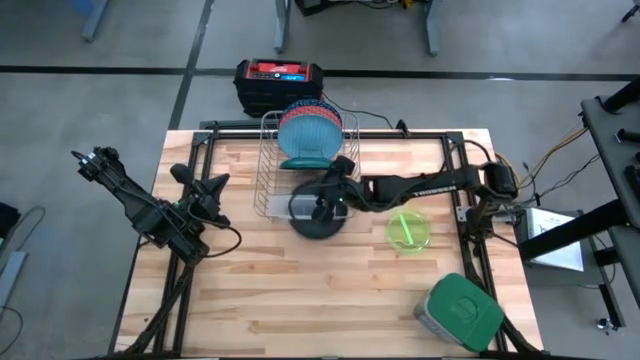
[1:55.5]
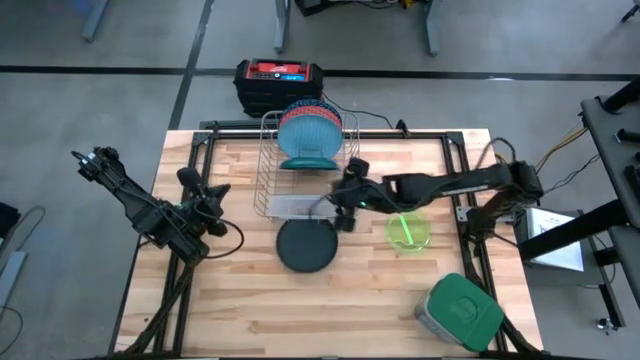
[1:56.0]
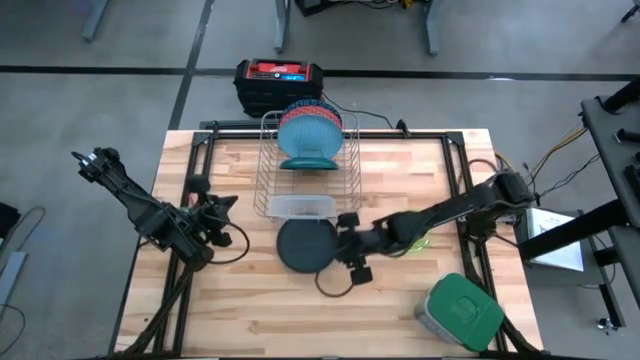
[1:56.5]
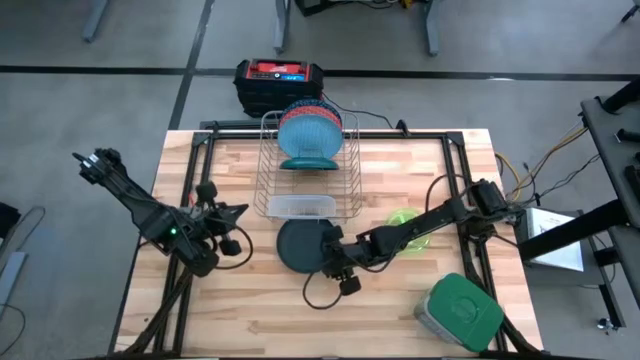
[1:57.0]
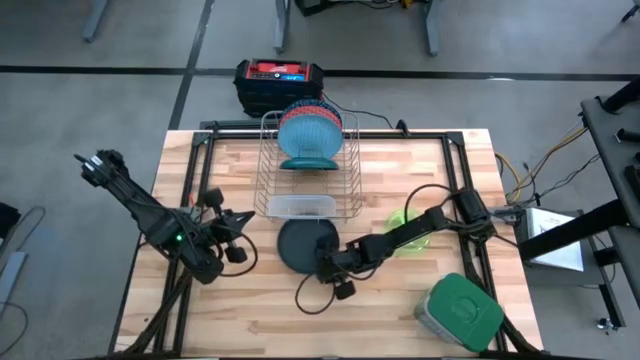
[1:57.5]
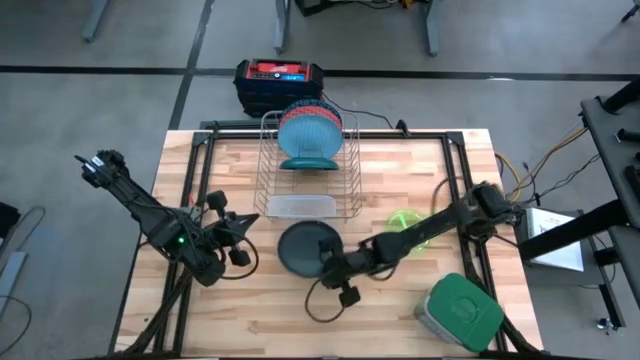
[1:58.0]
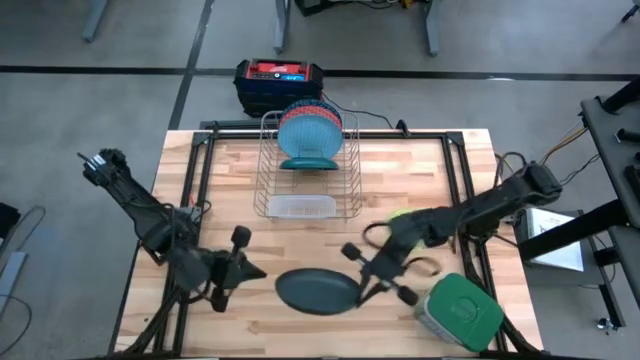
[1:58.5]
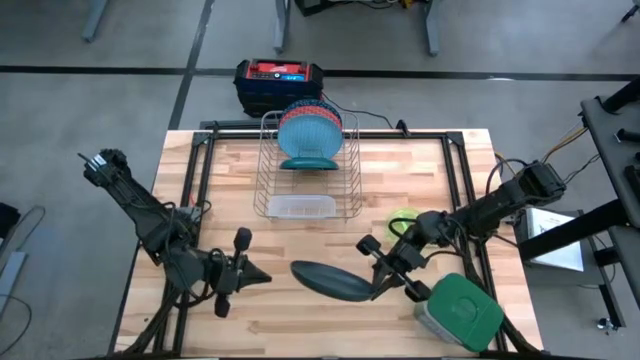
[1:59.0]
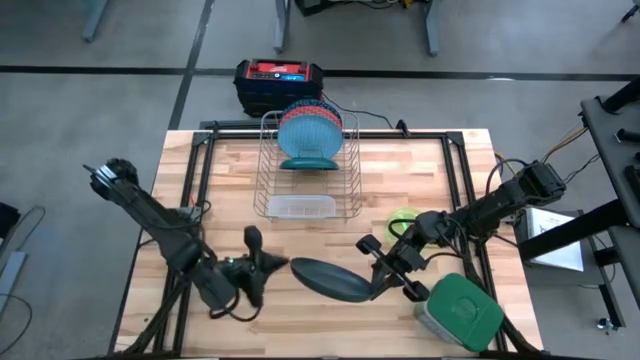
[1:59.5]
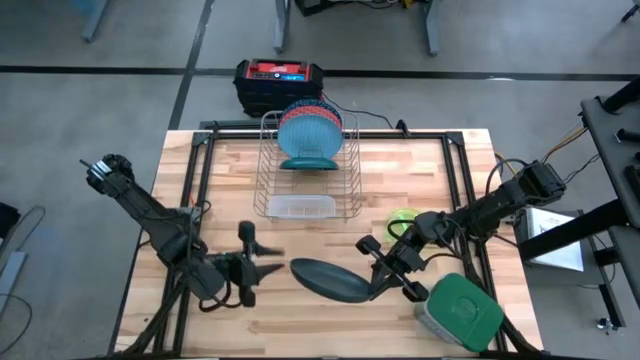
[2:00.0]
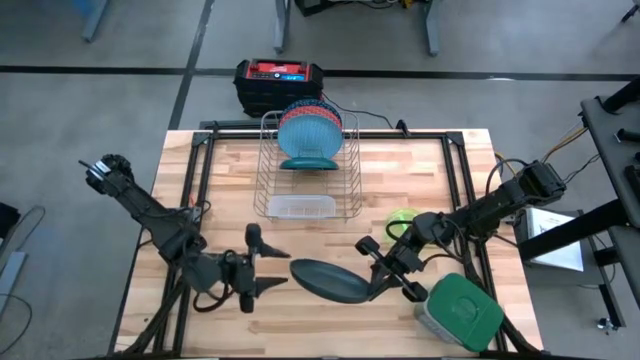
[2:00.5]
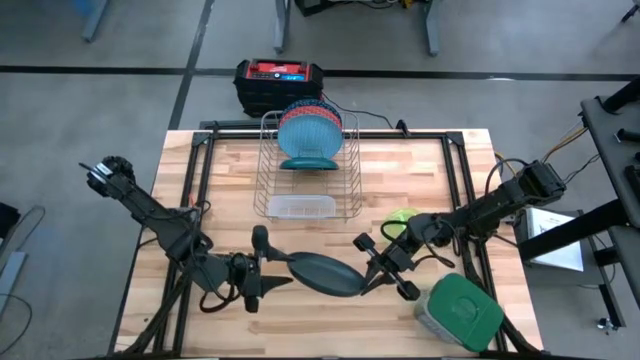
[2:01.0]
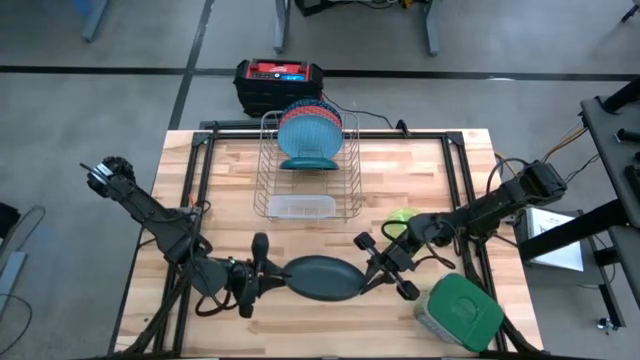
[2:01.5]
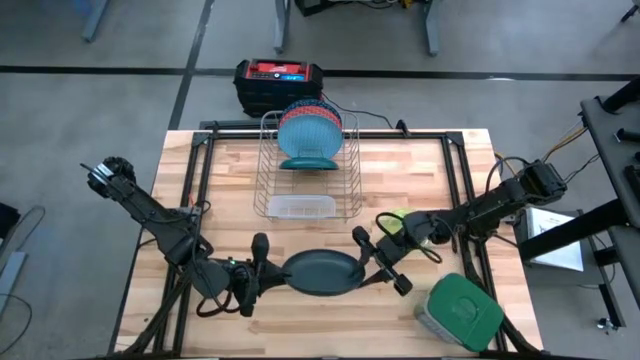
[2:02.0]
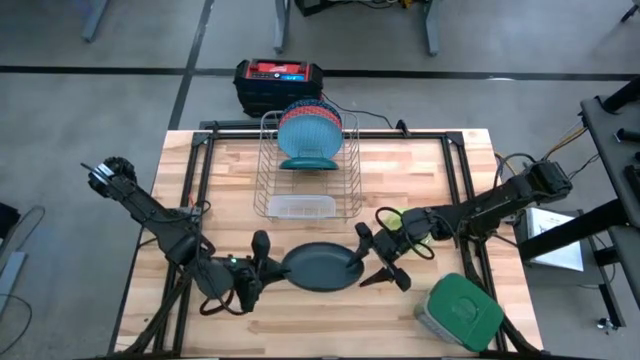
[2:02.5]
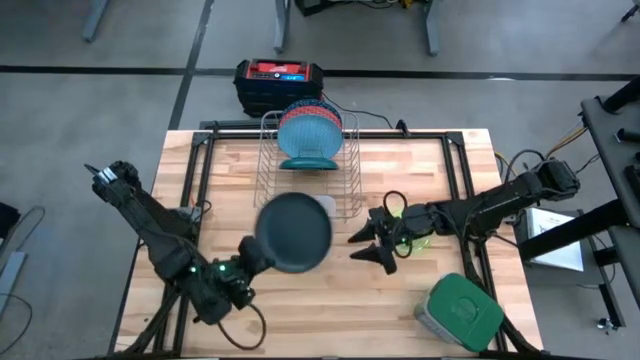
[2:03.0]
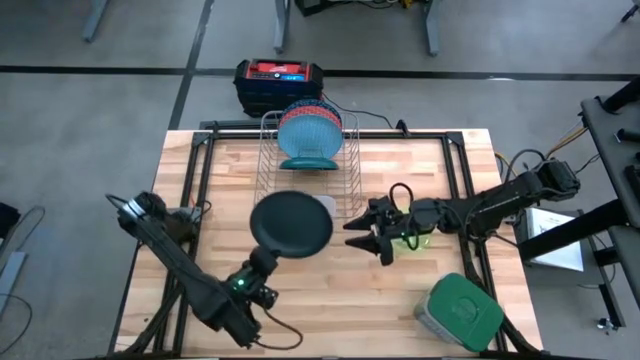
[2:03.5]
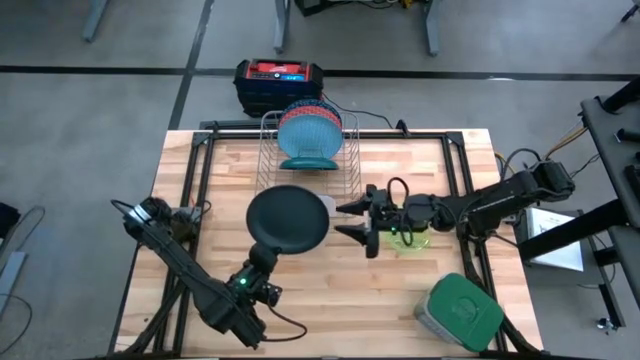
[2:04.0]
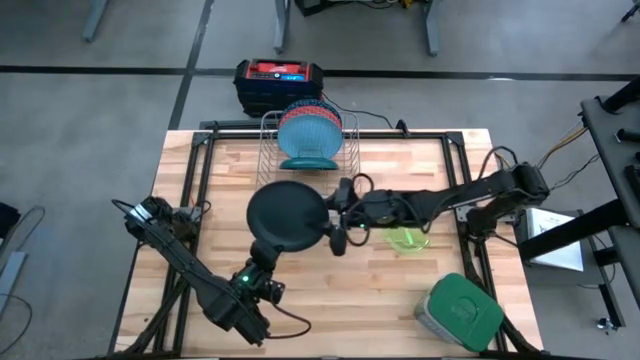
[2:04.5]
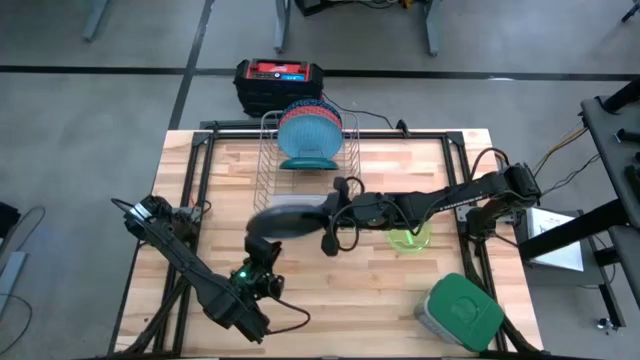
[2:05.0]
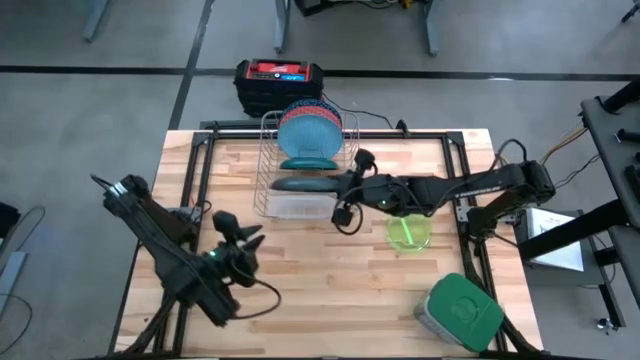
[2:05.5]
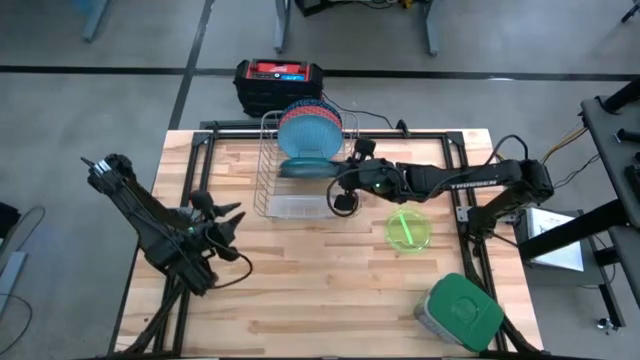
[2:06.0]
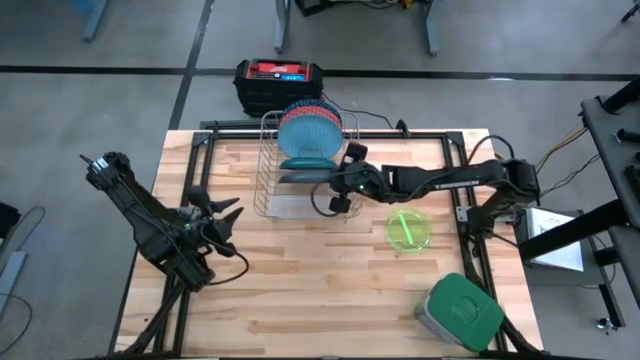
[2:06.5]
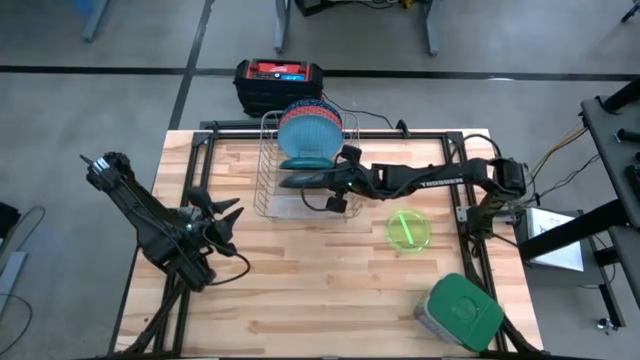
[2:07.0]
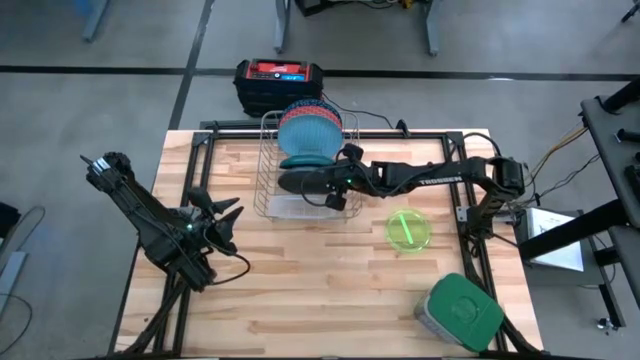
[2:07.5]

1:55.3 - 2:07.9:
Task: Sort dishes
Put the black plate into the dish rack

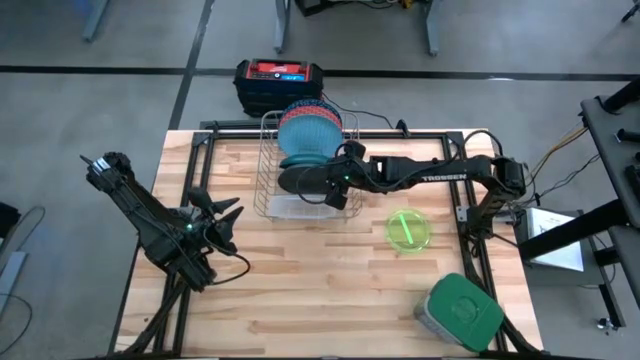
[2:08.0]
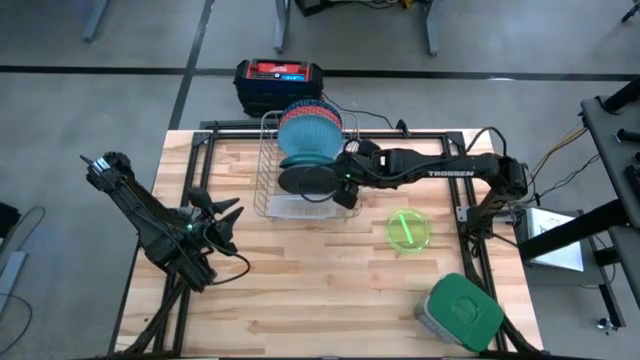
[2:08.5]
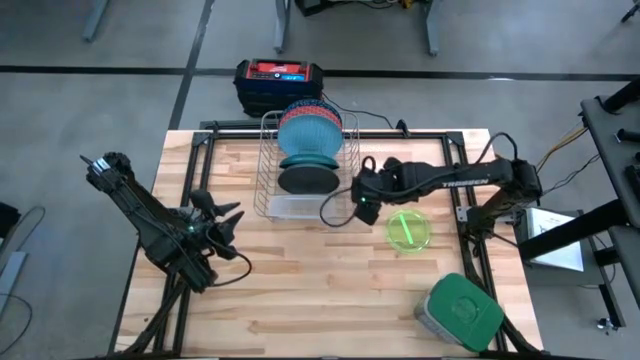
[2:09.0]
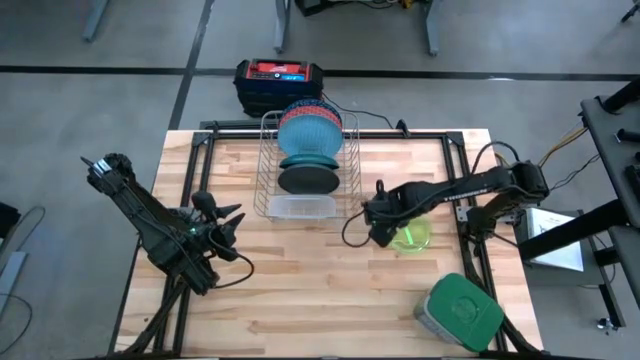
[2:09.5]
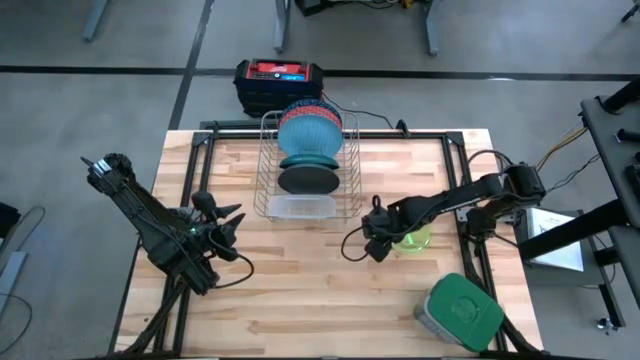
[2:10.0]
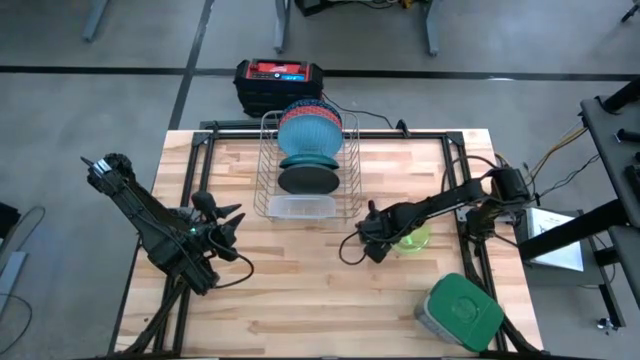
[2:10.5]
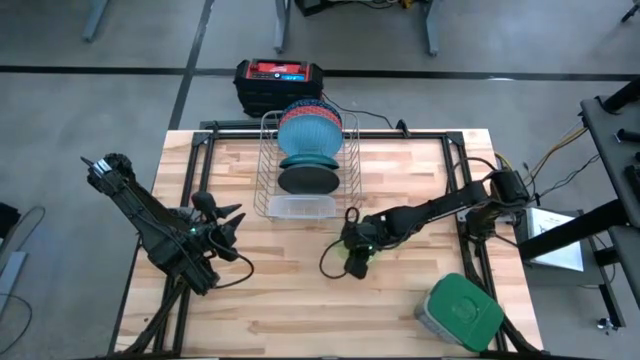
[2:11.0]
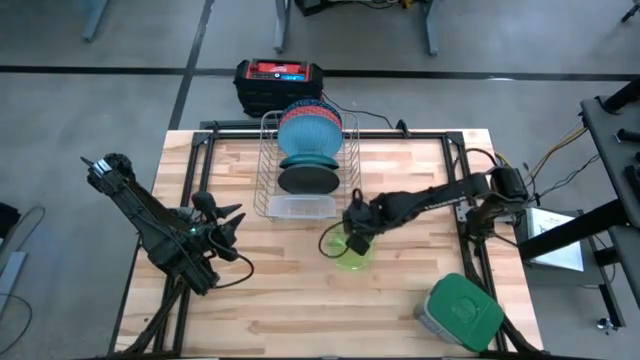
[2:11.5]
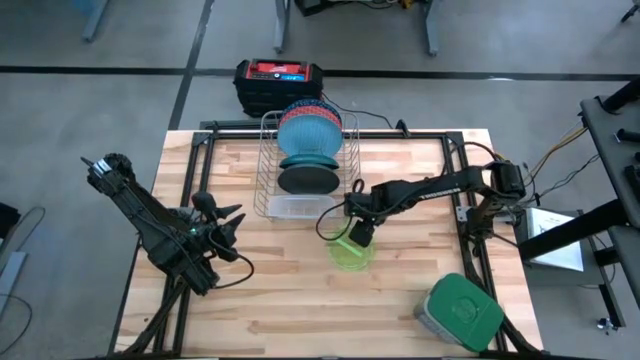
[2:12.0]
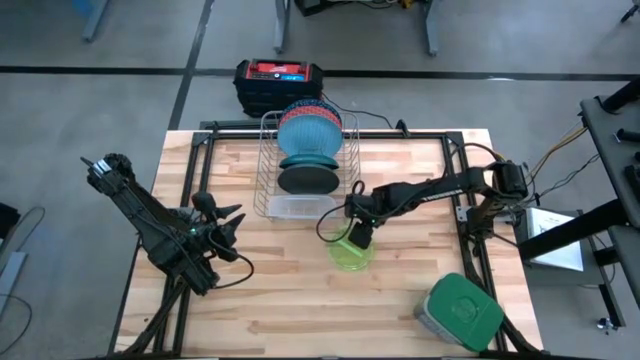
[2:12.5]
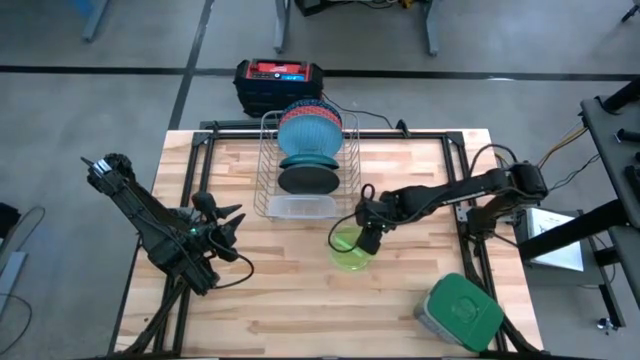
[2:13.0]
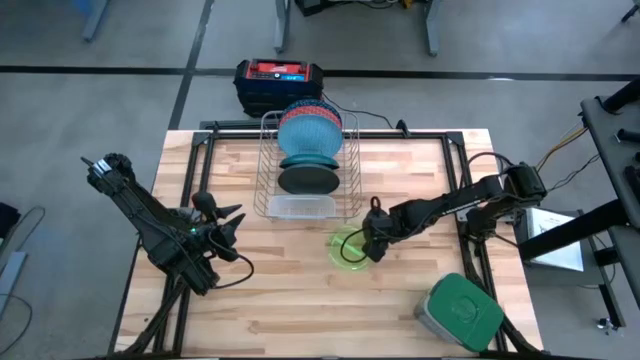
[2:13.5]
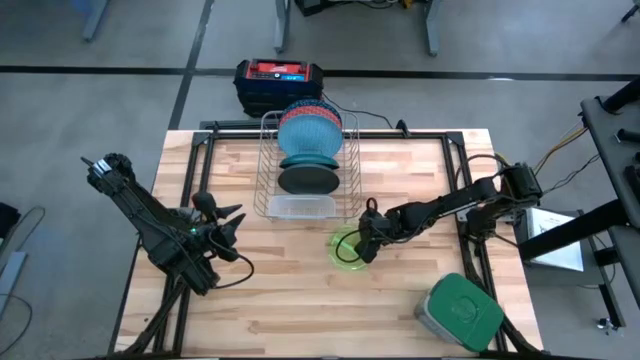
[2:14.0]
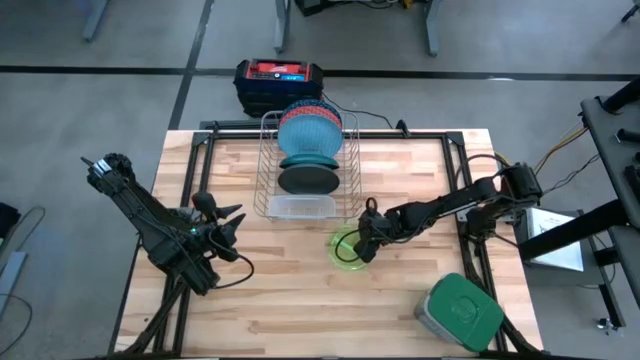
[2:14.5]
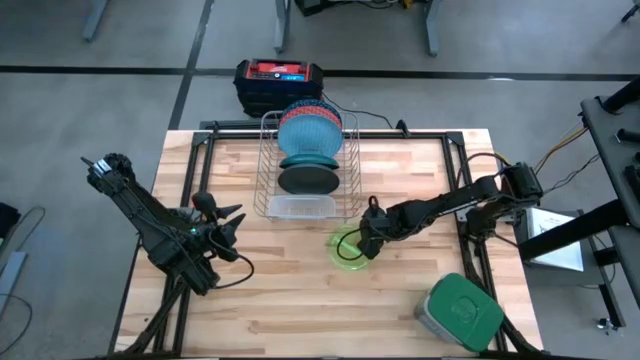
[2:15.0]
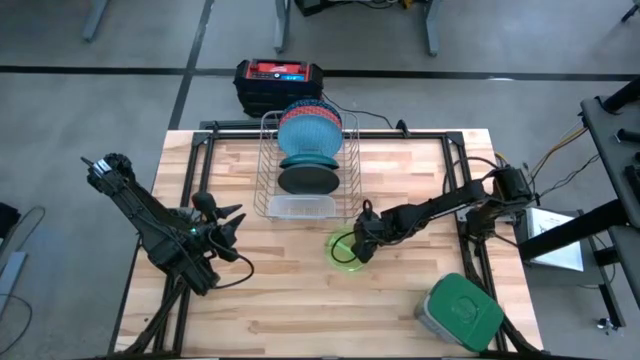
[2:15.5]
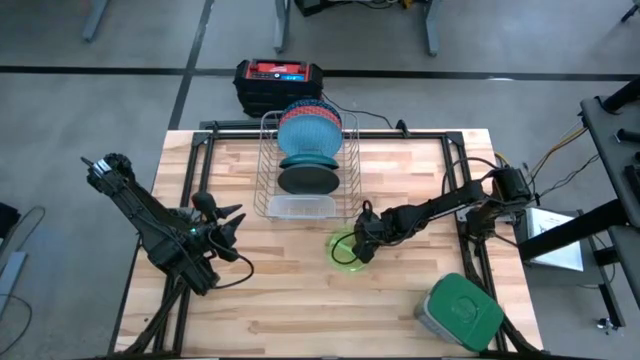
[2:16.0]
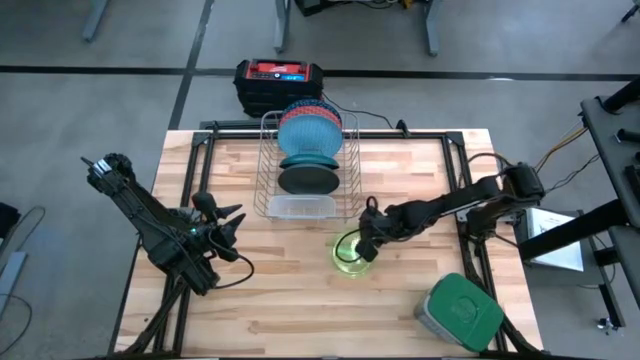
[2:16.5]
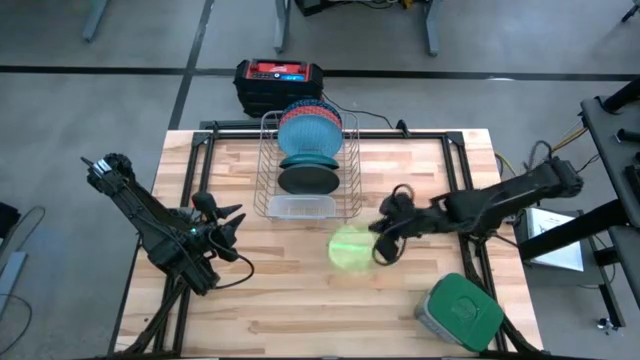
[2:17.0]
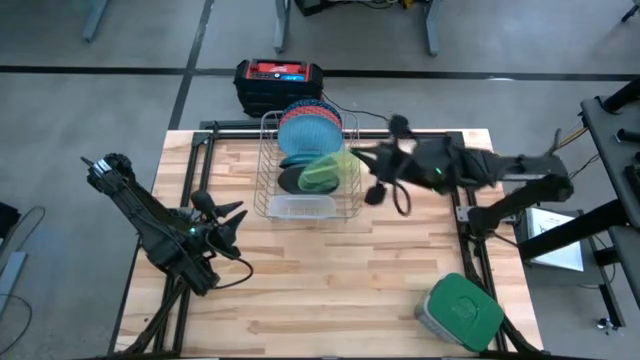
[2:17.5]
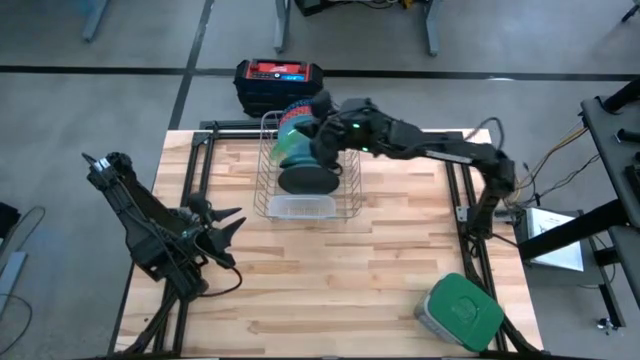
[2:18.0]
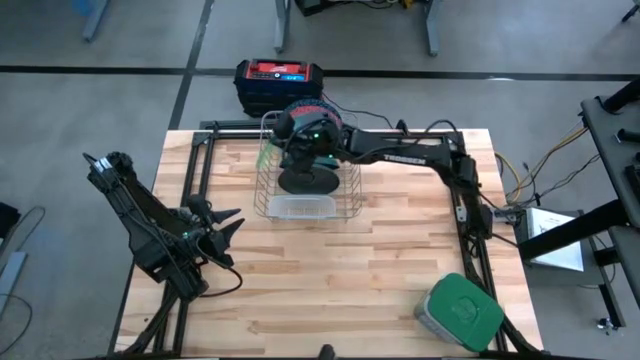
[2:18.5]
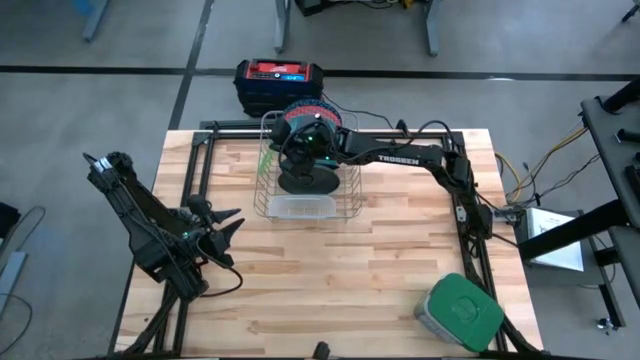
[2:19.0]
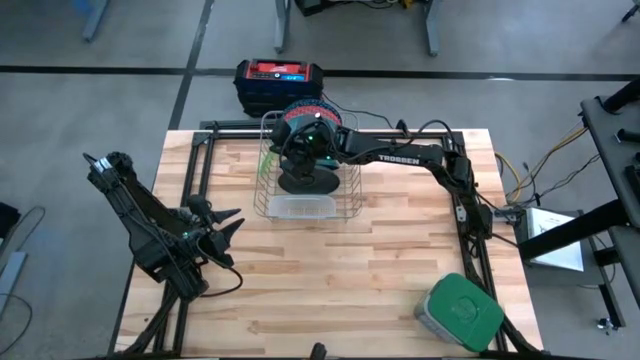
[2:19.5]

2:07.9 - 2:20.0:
Put the transparent green plate into the dish rack
